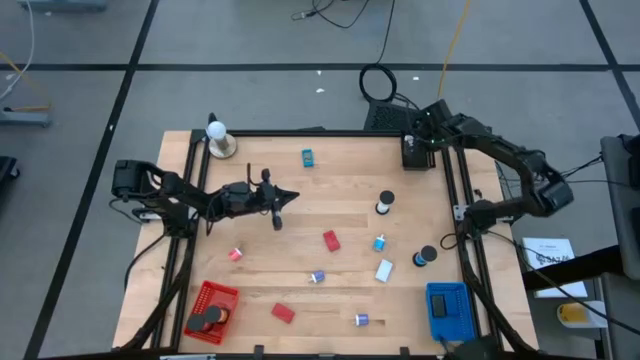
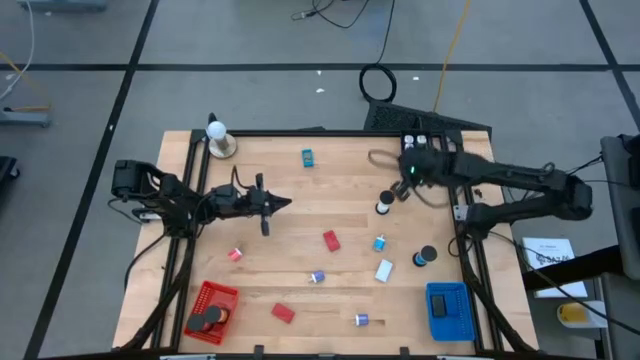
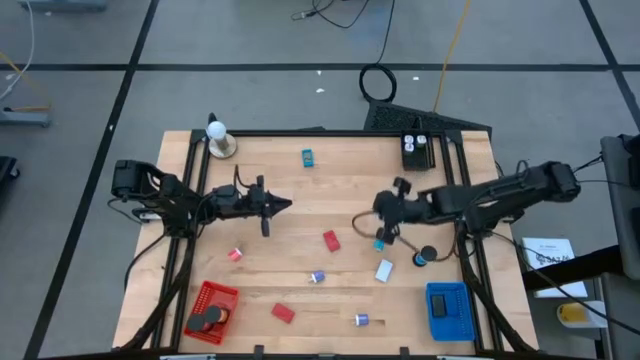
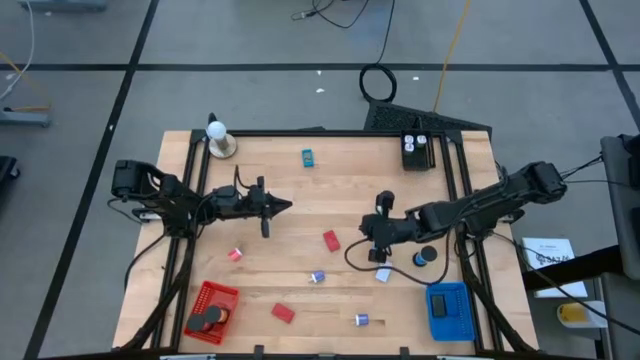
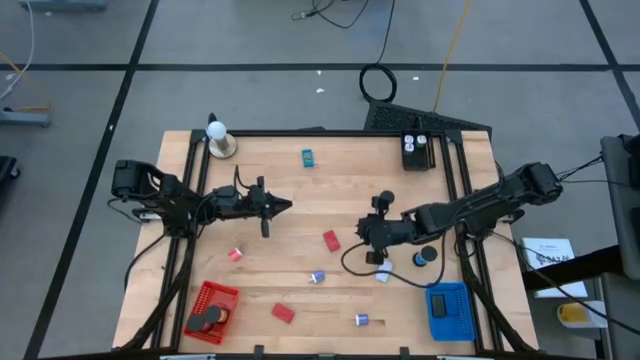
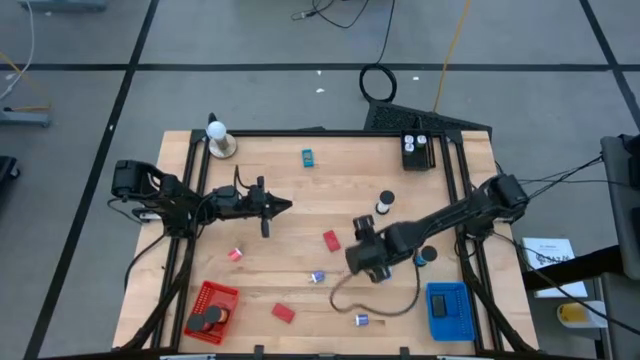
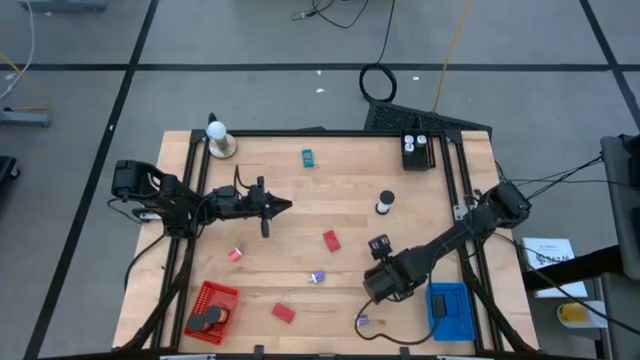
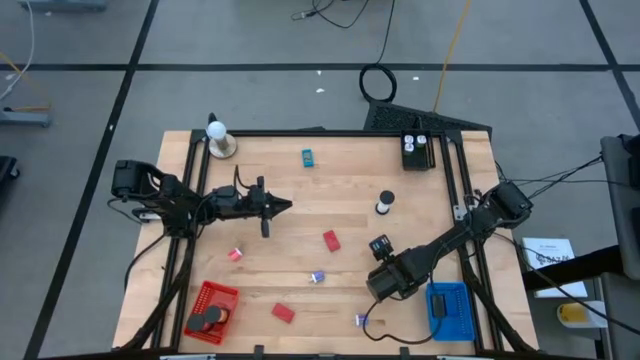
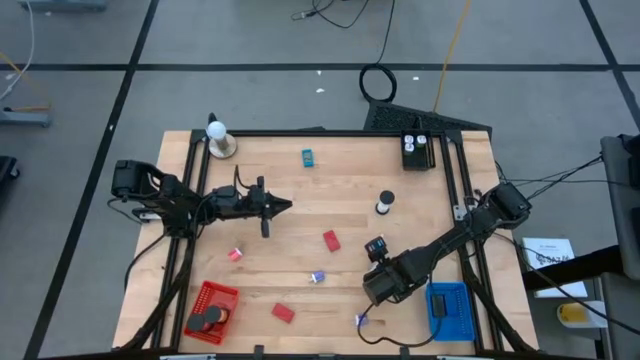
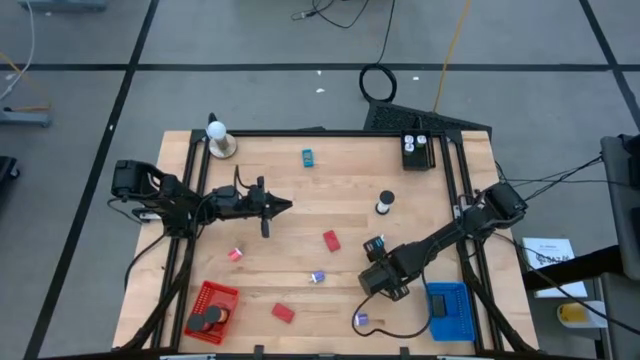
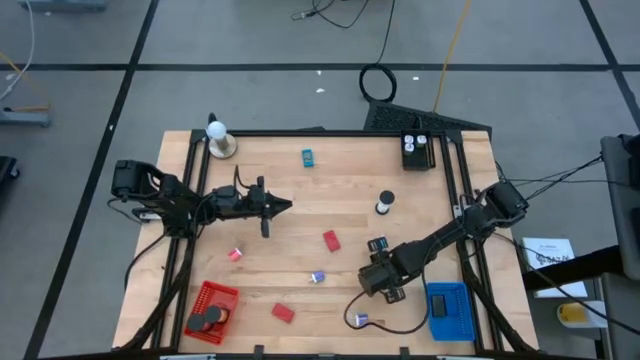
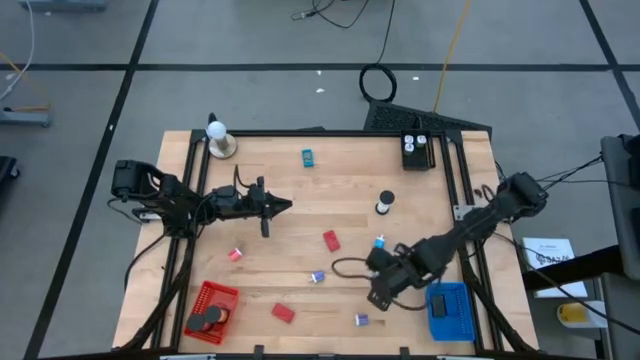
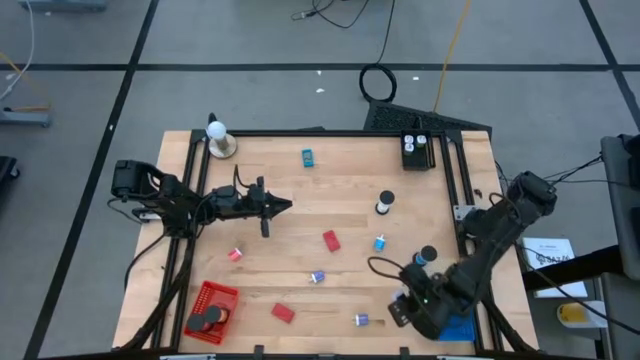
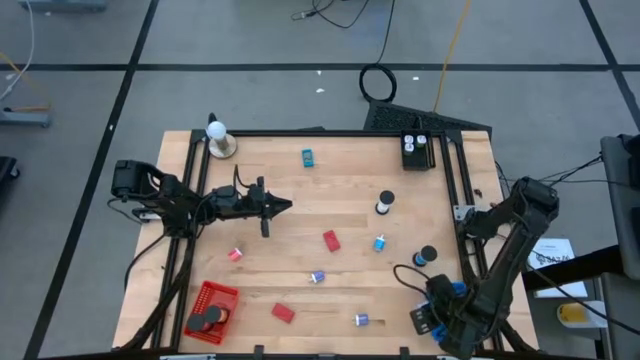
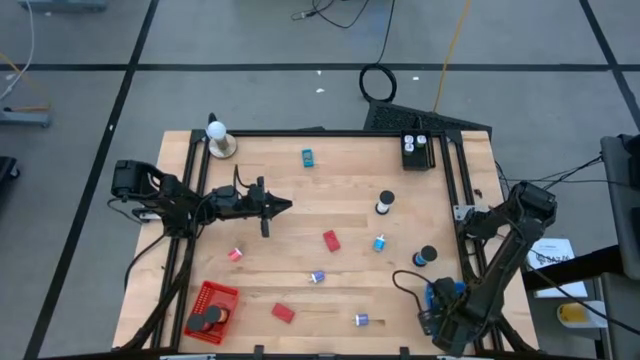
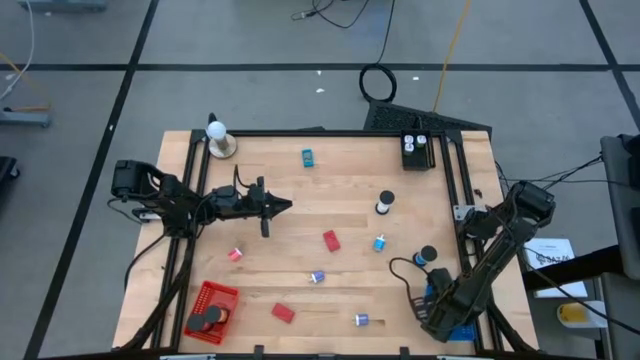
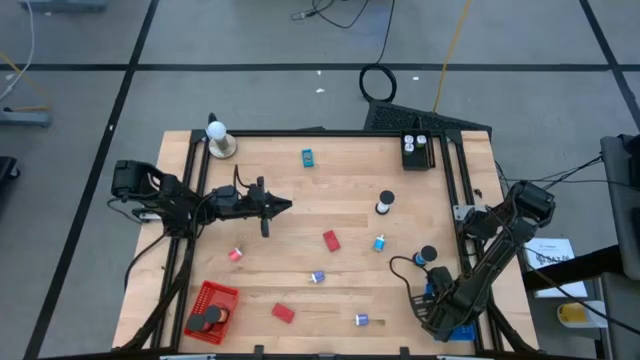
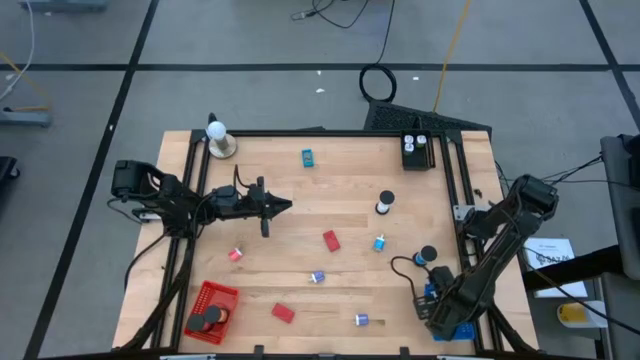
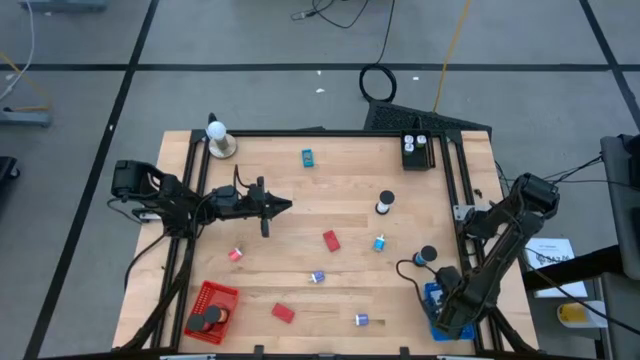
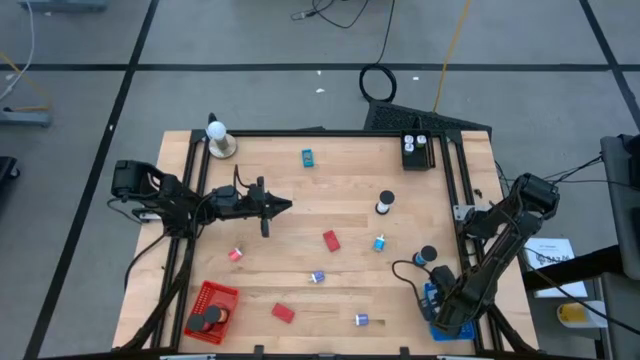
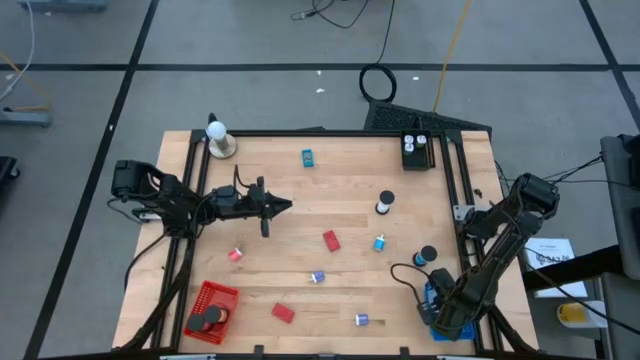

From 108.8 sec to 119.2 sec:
Task: Pick & Place Office items
Put the white digital clock into the blue bin

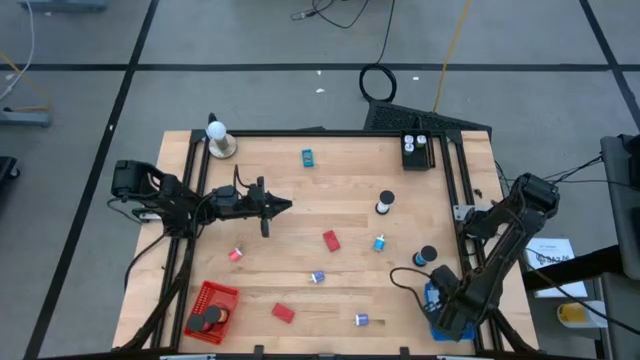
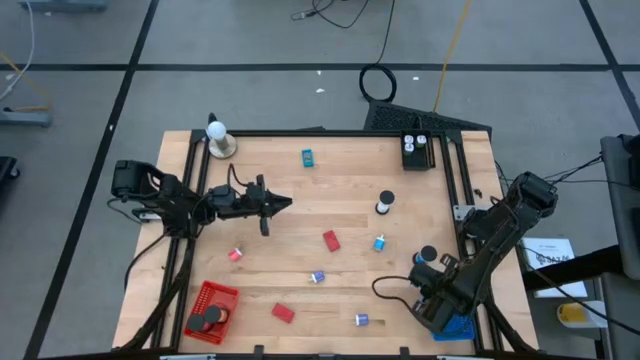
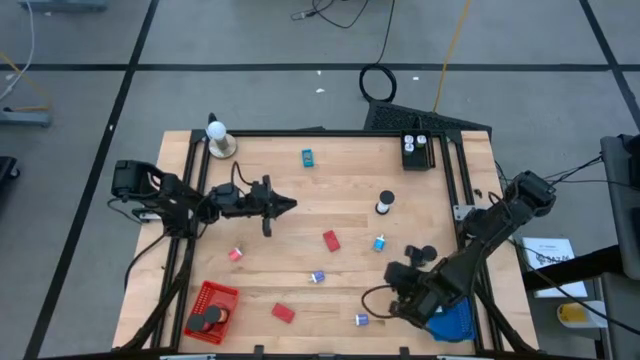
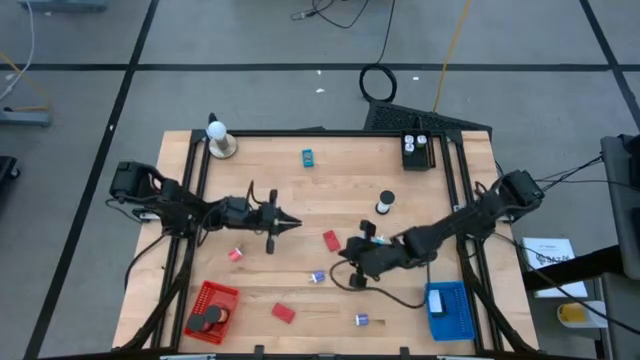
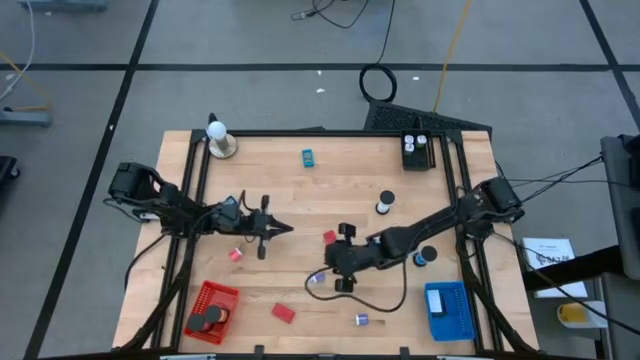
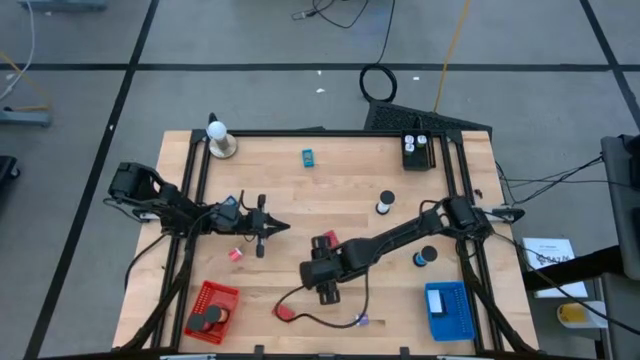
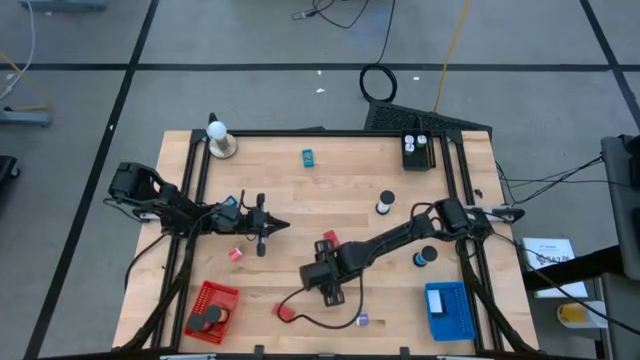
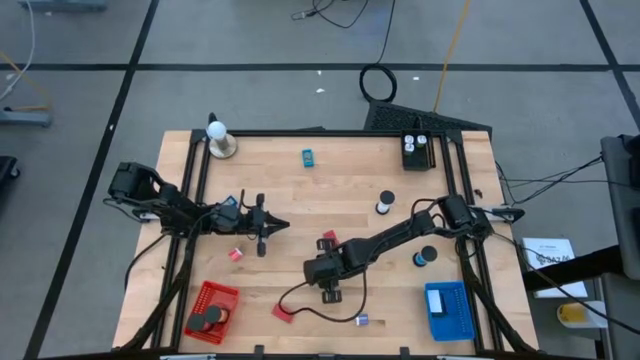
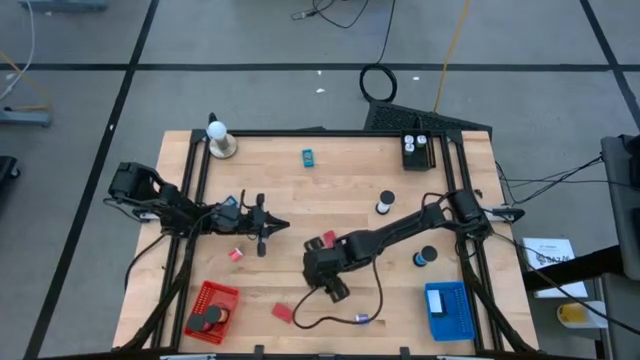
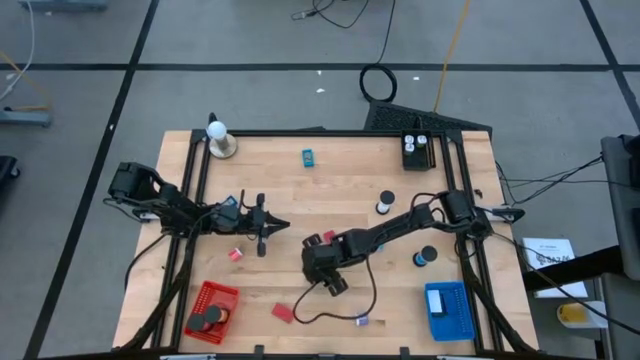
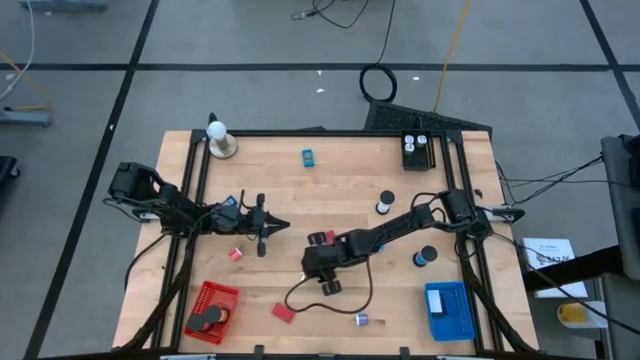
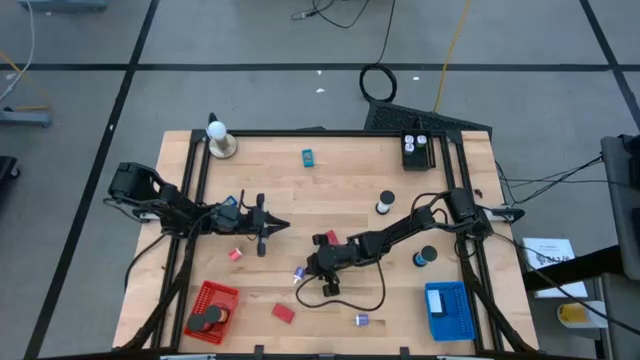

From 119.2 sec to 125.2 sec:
Put the violet charger adapter into the black bin

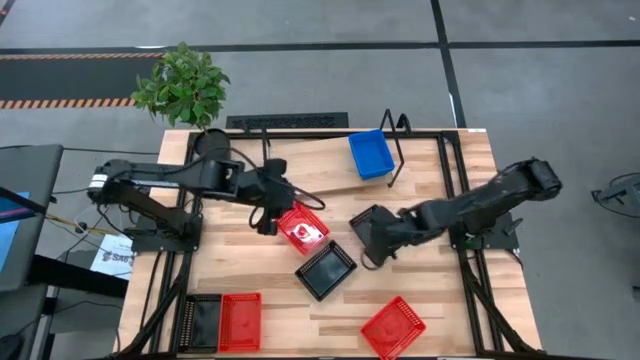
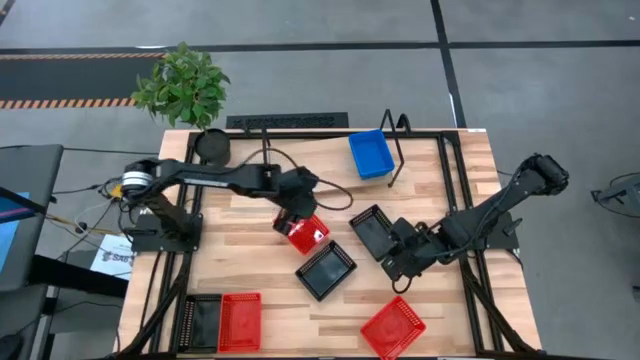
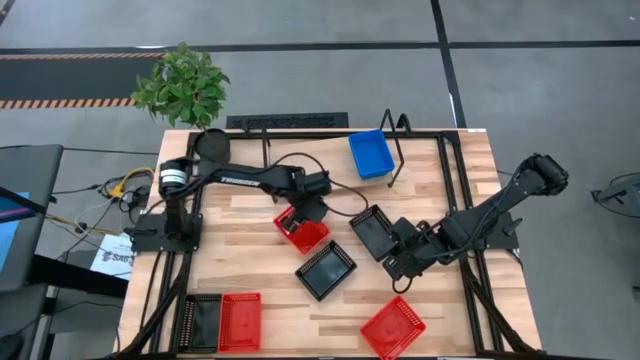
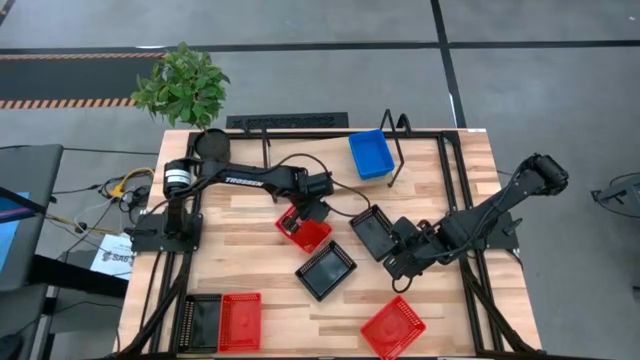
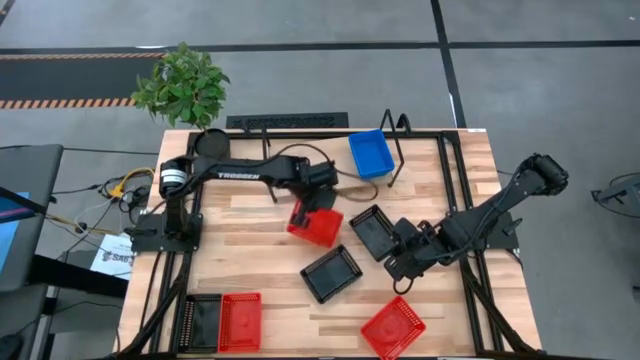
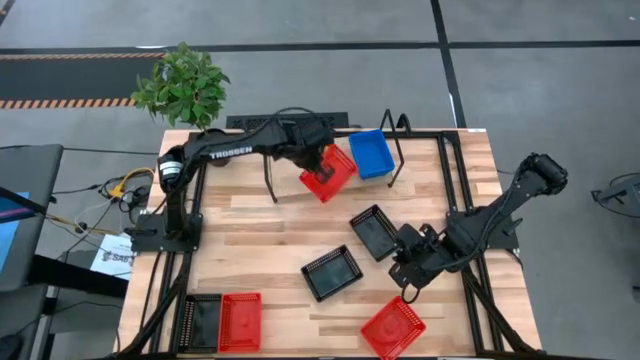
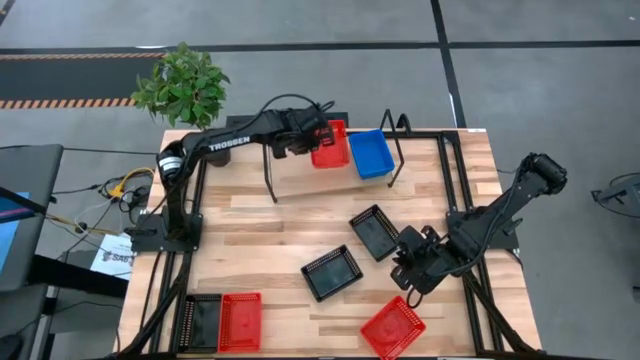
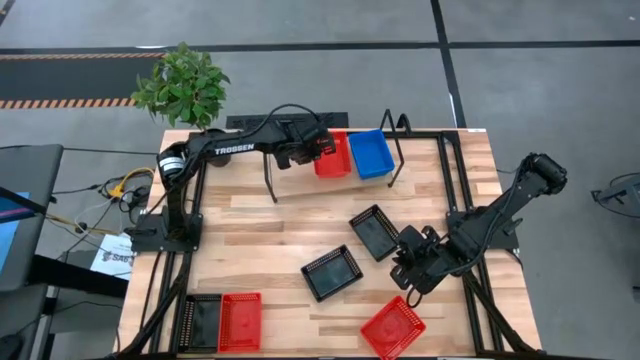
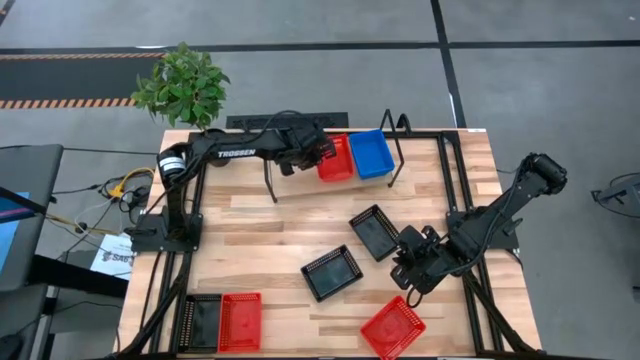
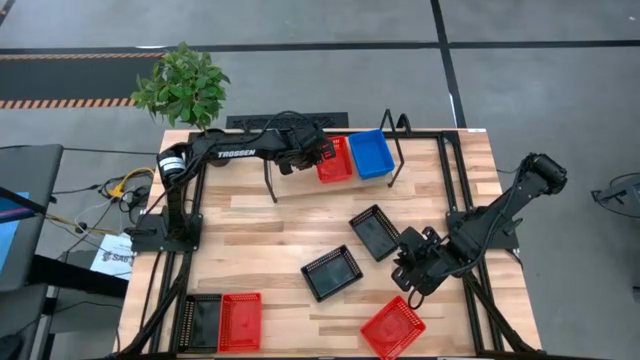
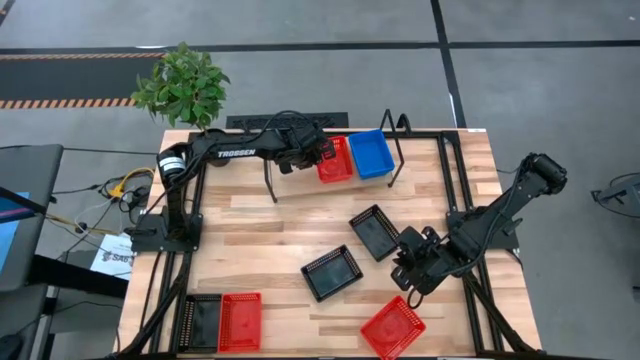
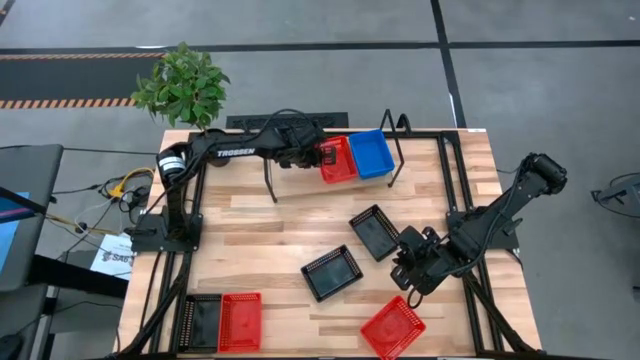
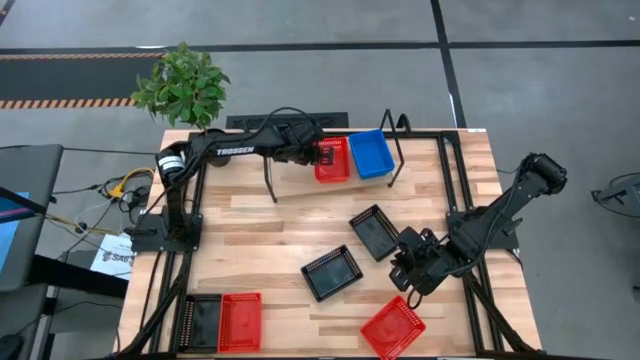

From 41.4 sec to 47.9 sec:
Task: Stack baskets on shelf by color
Put the top left red bin on the shelf
